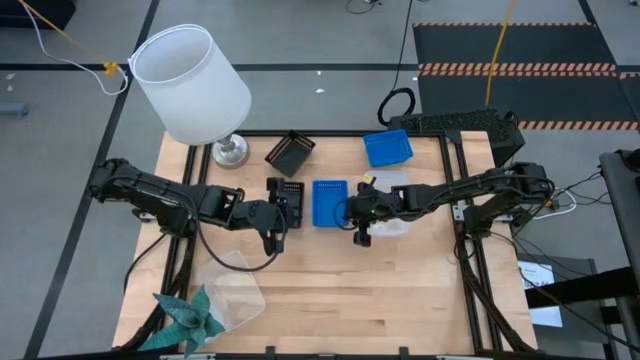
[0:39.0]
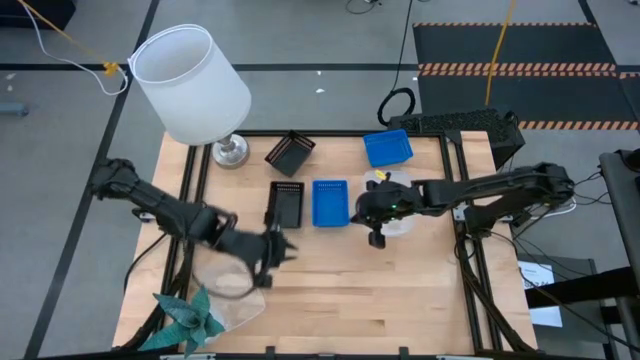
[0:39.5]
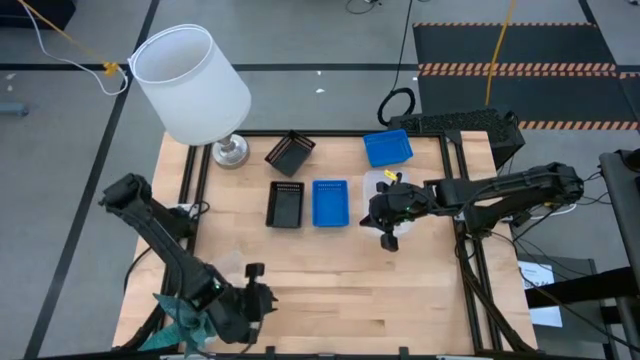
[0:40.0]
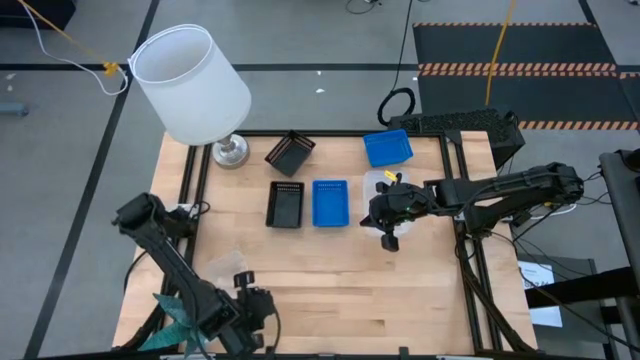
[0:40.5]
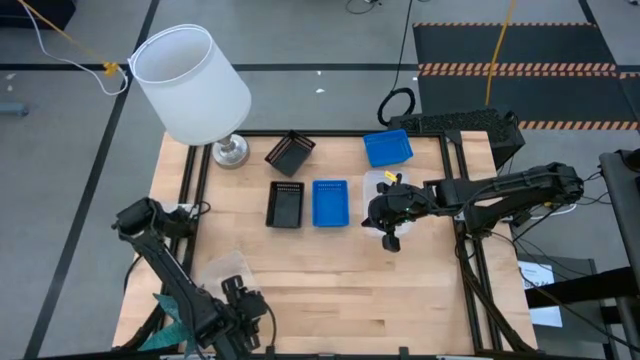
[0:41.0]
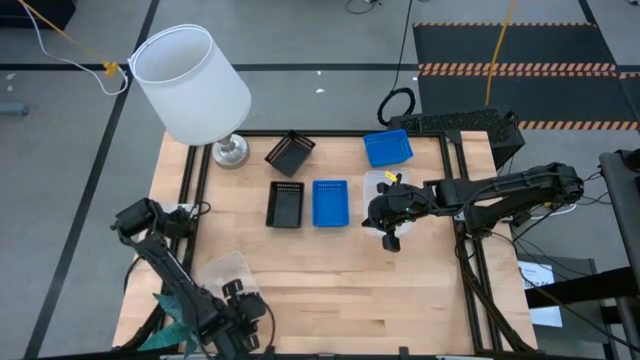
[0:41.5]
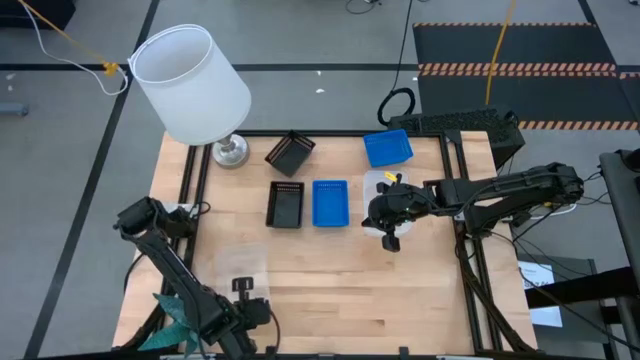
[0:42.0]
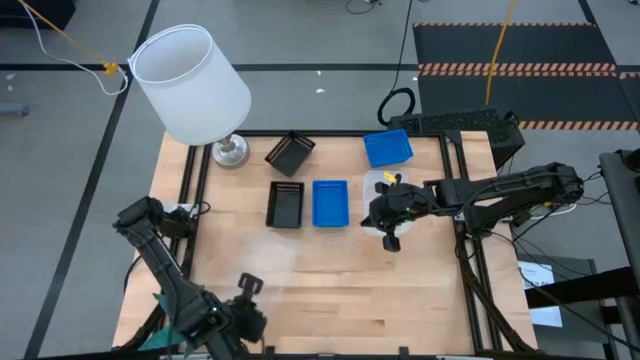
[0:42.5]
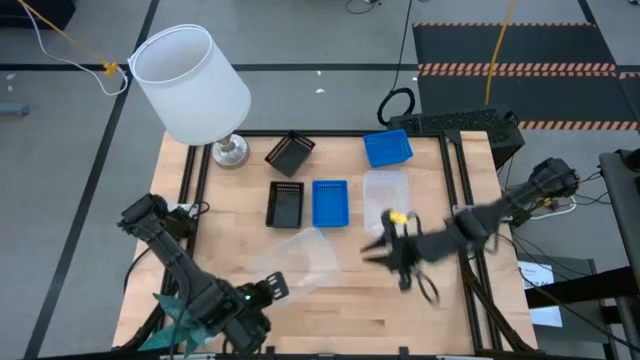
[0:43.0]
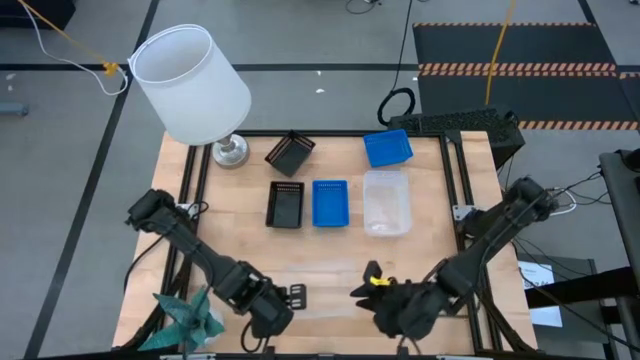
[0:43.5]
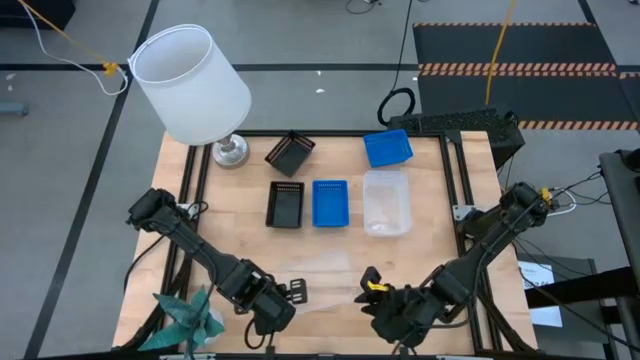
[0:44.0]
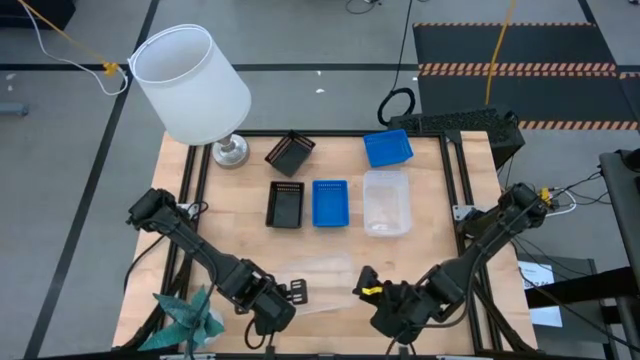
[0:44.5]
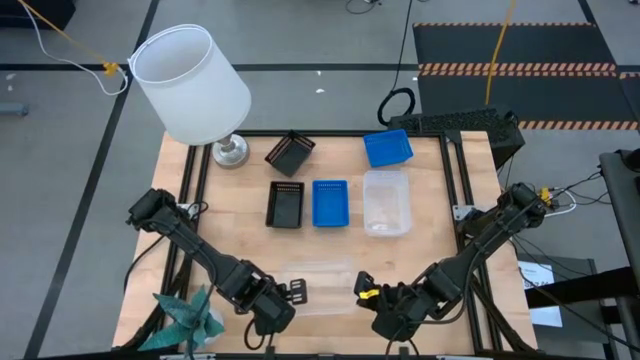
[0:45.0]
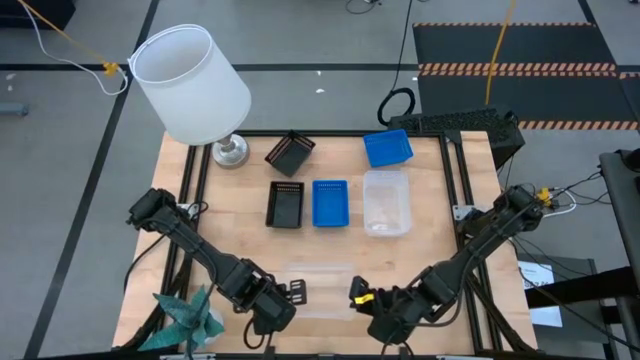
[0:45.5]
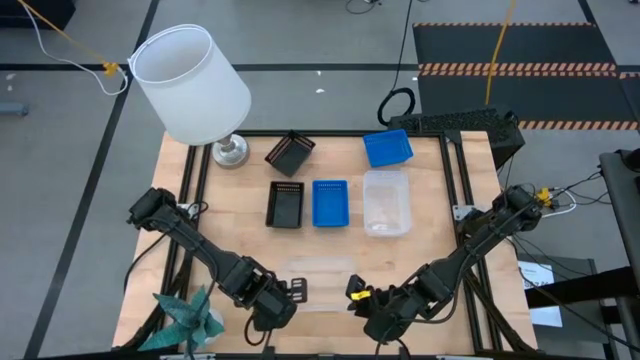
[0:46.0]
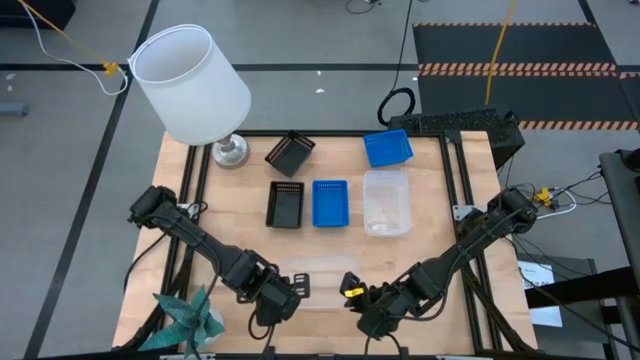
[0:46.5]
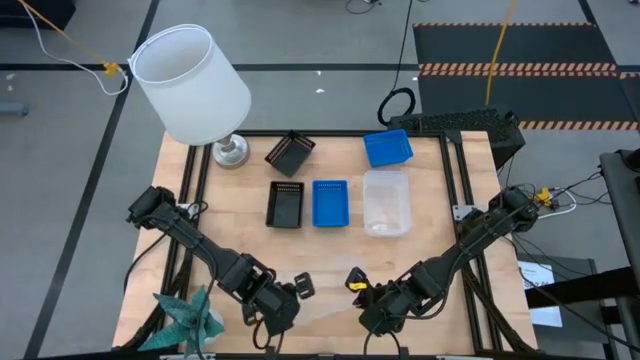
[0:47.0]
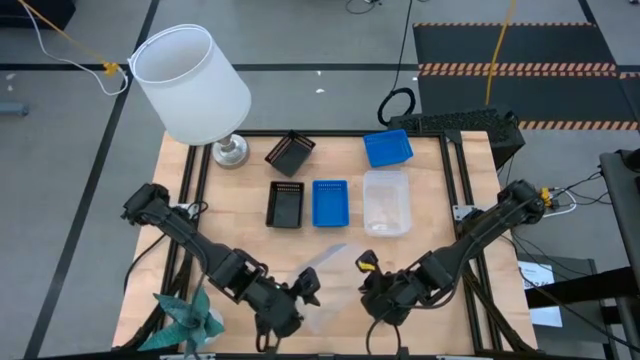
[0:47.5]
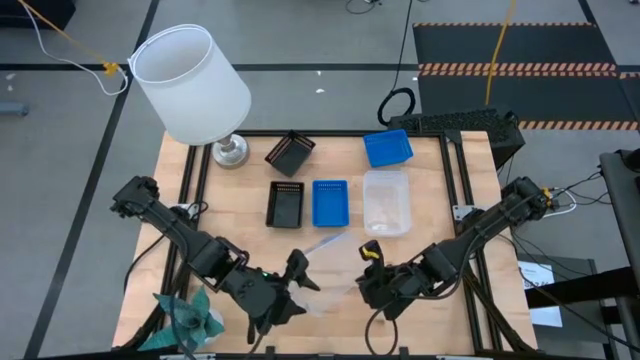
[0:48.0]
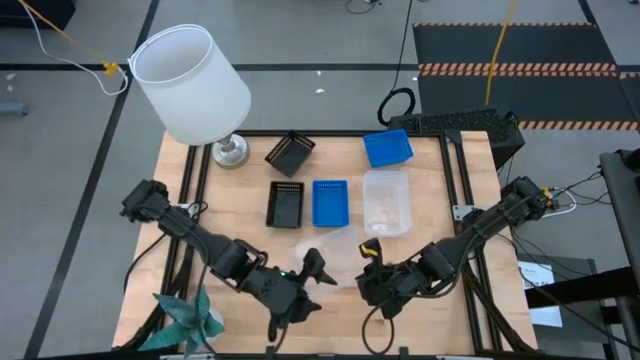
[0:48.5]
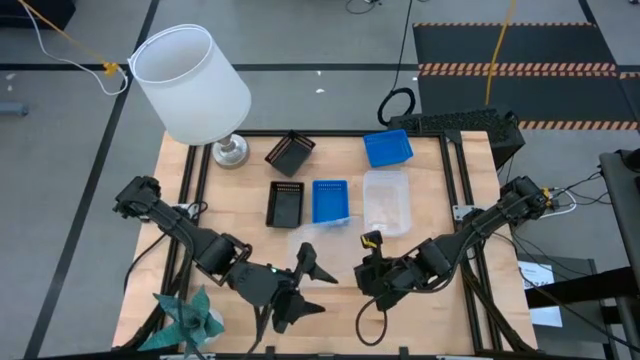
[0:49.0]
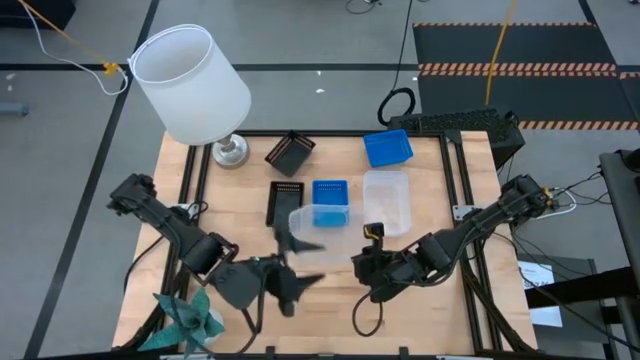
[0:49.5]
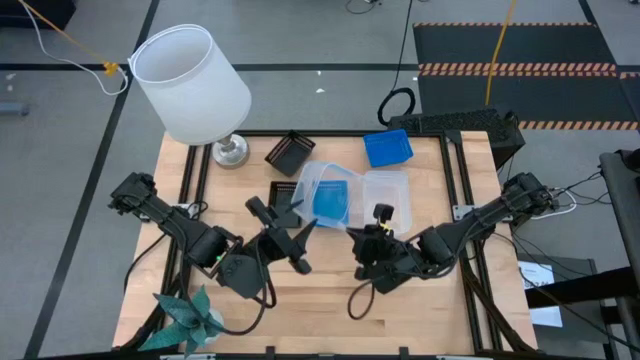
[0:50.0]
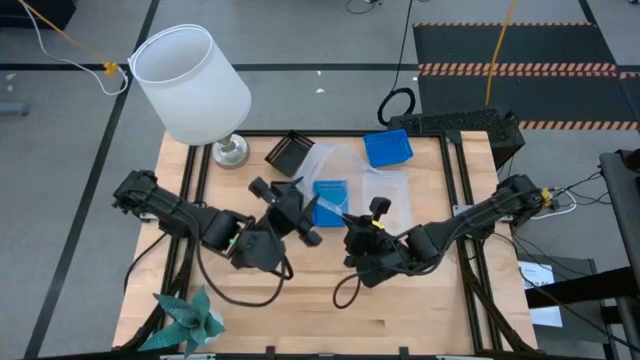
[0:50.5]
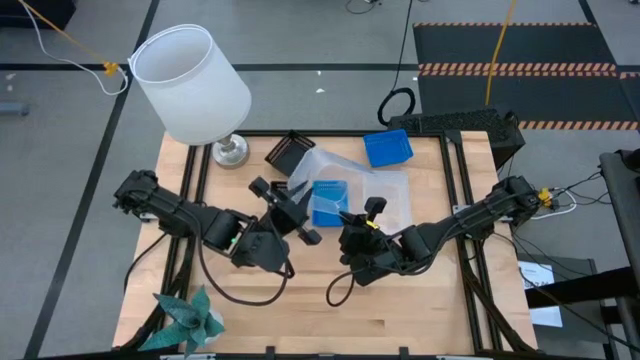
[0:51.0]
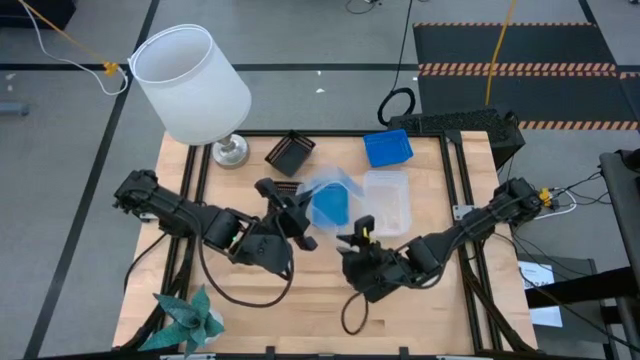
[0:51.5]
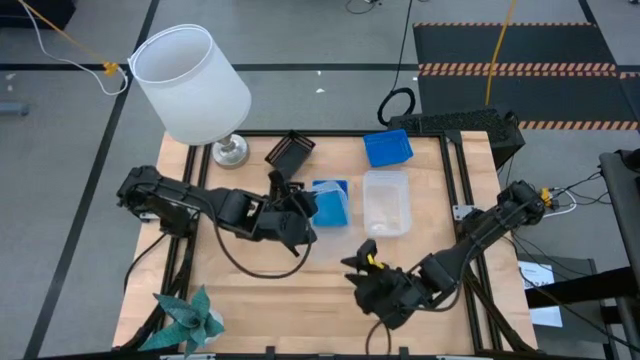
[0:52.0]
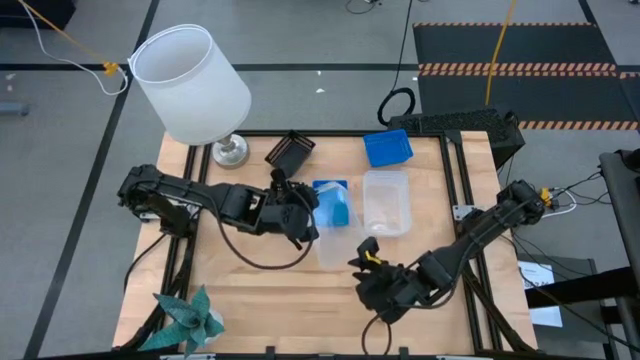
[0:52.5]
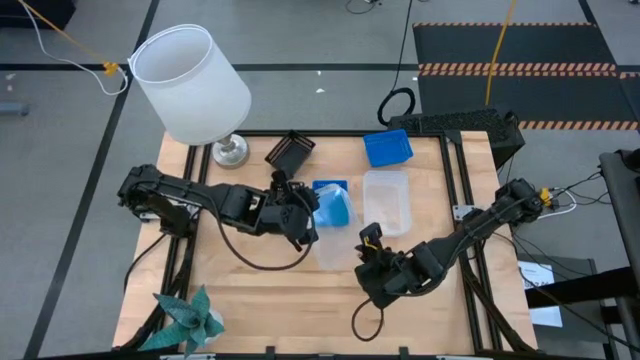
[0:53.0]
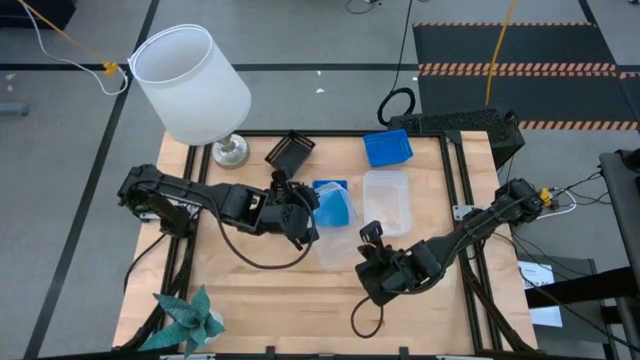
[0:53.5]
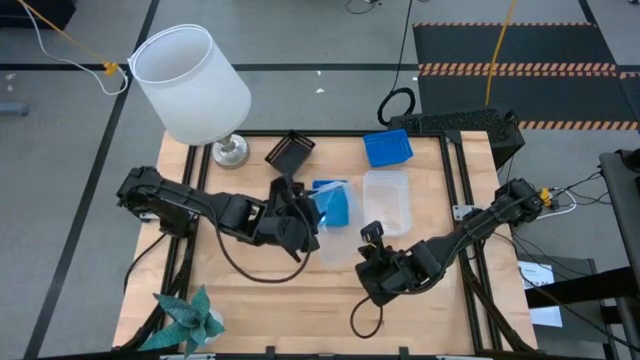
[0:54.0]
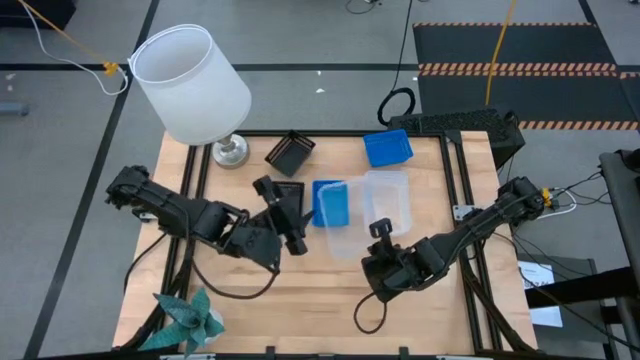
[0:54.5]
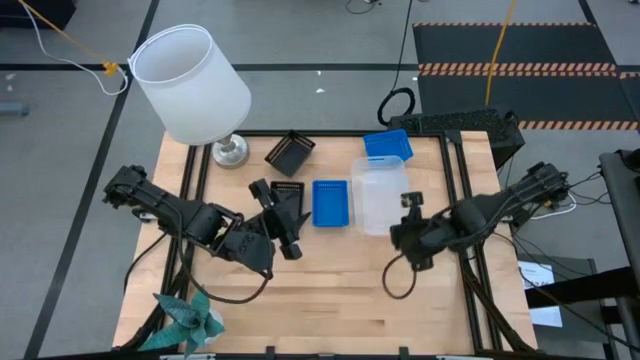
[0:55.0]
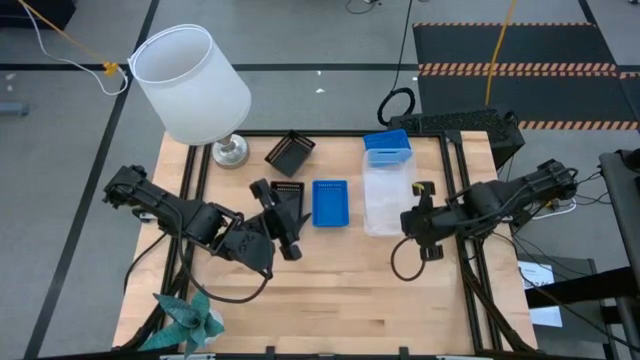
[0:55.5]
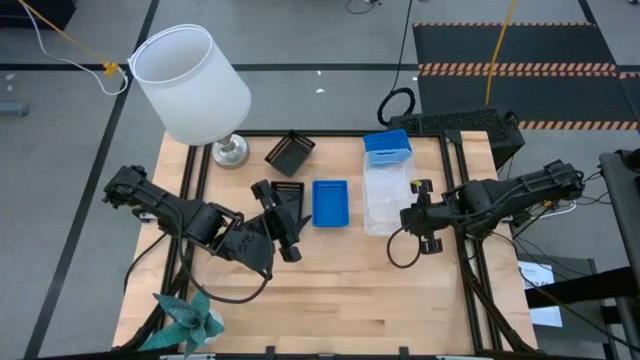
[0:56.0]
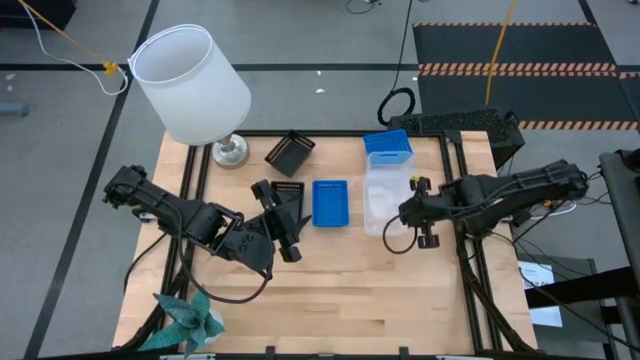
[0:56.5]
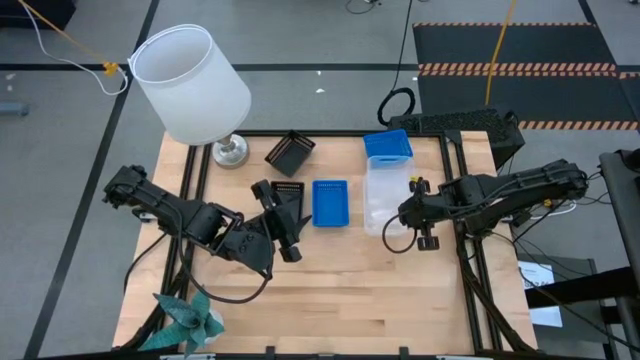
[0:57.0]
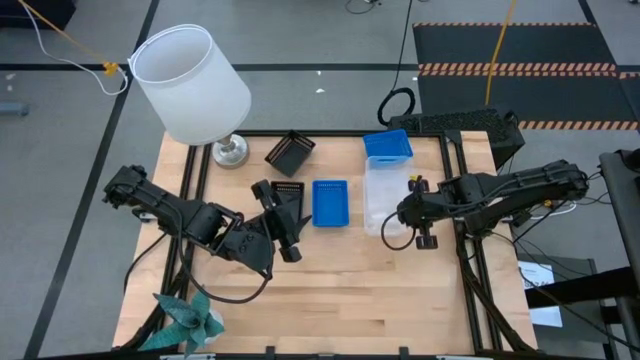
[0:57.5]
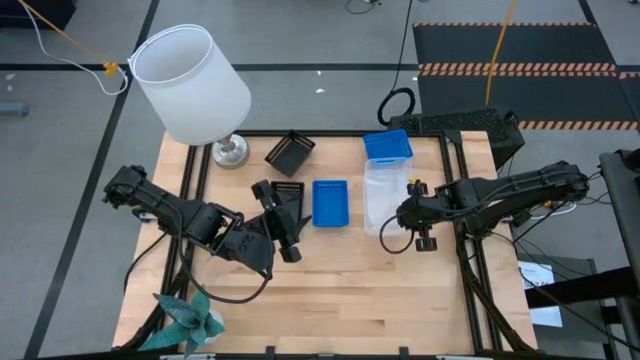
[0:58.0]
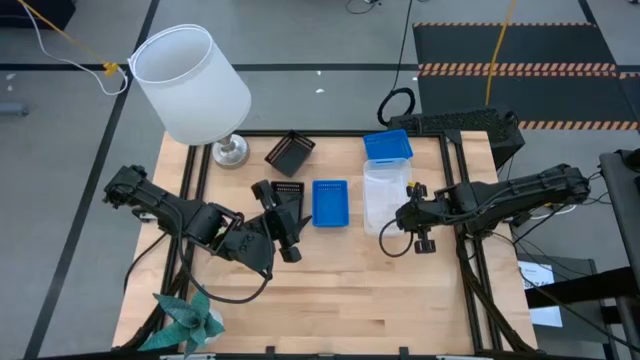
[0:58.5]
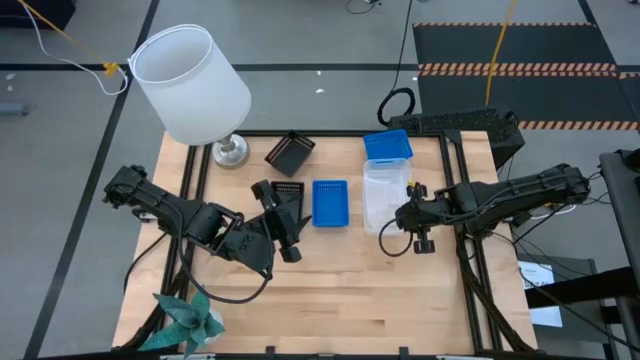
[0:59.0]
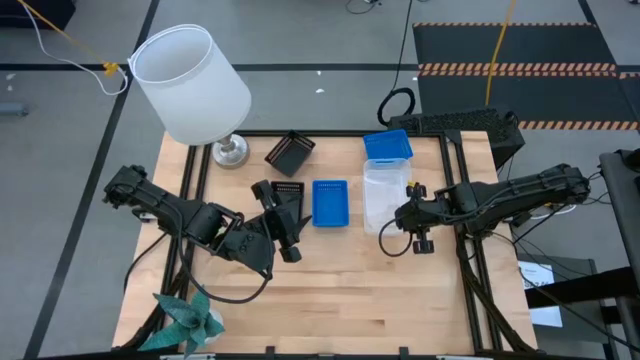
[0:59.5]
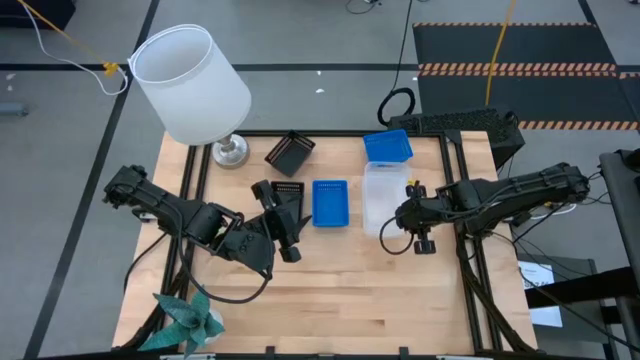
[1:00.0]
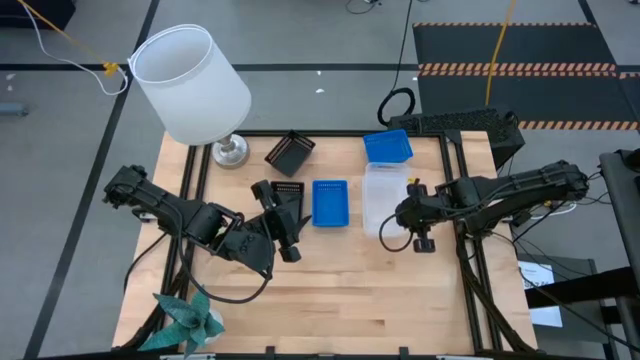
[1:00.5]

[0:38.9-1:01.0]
Stack the bottom transparent bin on top of the top transparent bin
